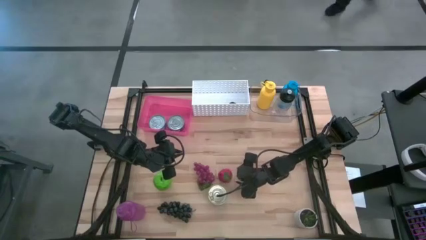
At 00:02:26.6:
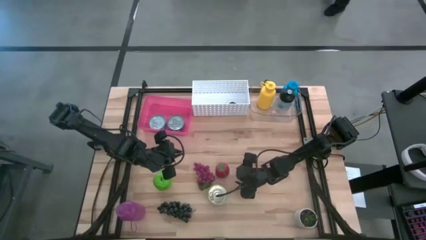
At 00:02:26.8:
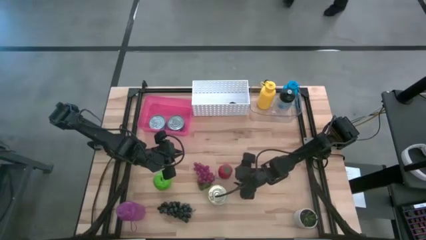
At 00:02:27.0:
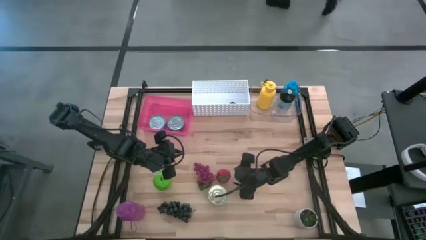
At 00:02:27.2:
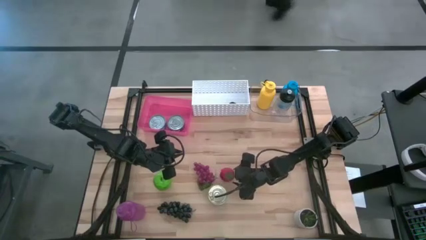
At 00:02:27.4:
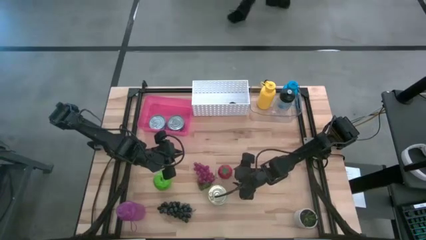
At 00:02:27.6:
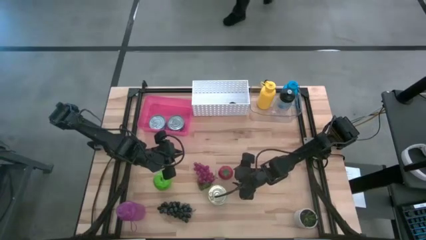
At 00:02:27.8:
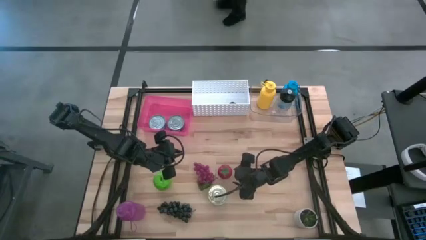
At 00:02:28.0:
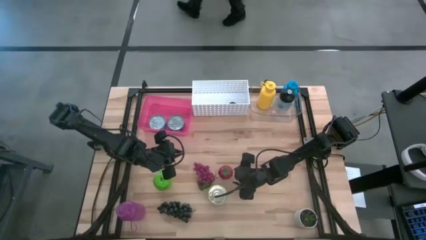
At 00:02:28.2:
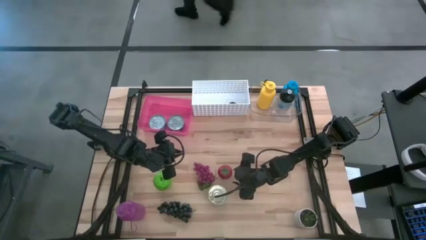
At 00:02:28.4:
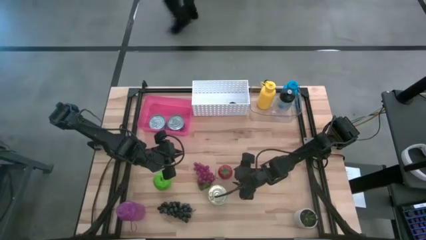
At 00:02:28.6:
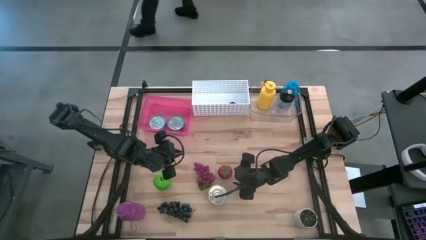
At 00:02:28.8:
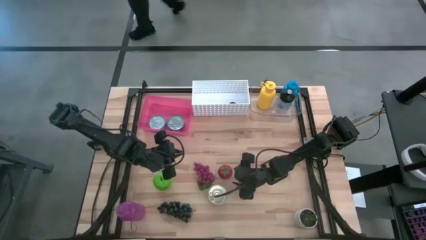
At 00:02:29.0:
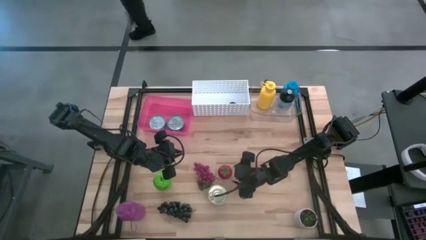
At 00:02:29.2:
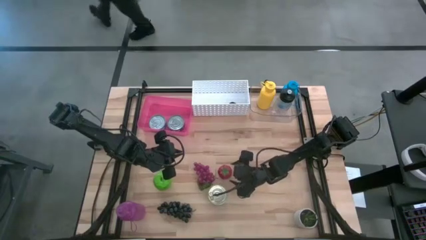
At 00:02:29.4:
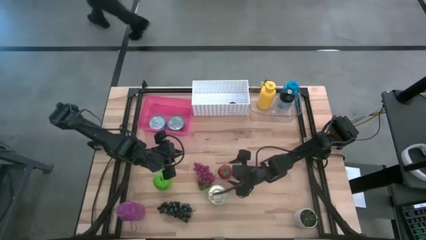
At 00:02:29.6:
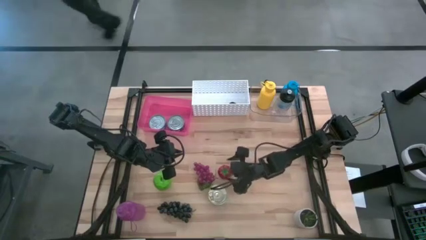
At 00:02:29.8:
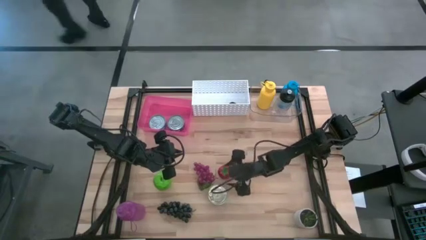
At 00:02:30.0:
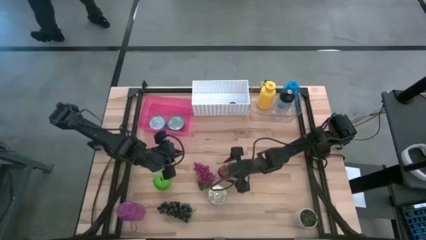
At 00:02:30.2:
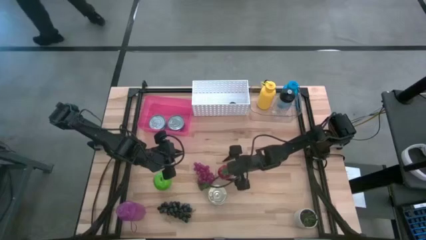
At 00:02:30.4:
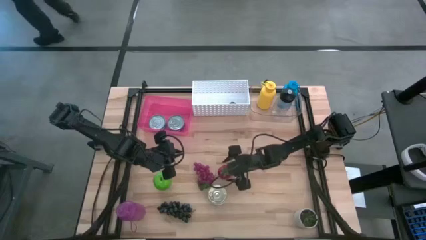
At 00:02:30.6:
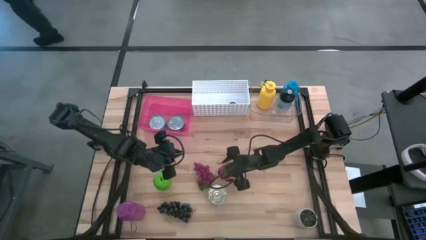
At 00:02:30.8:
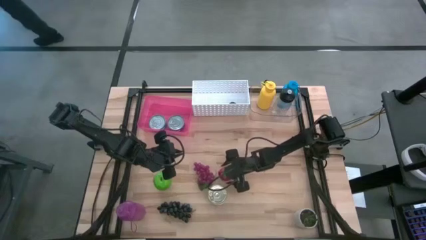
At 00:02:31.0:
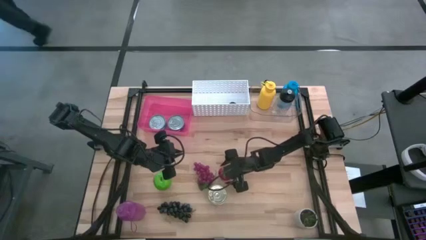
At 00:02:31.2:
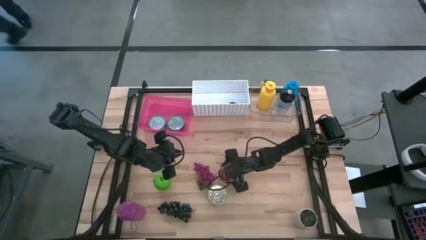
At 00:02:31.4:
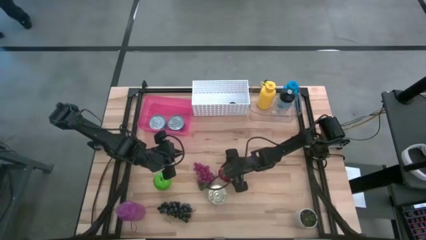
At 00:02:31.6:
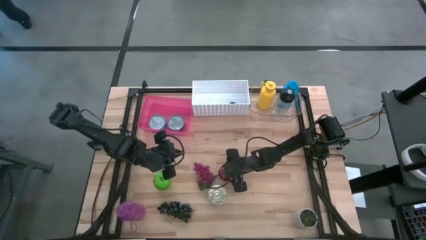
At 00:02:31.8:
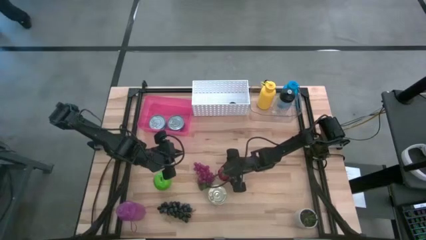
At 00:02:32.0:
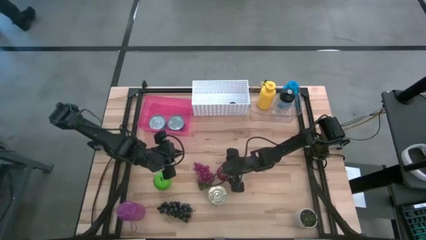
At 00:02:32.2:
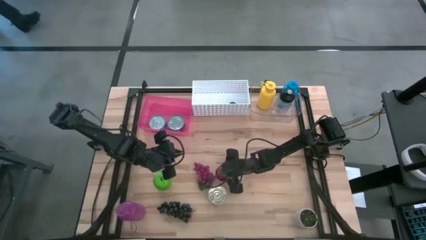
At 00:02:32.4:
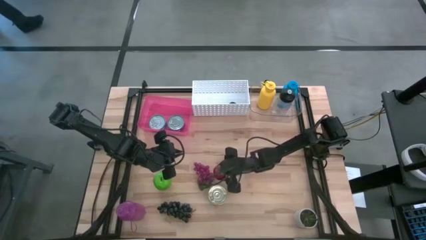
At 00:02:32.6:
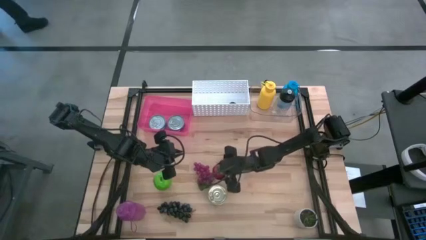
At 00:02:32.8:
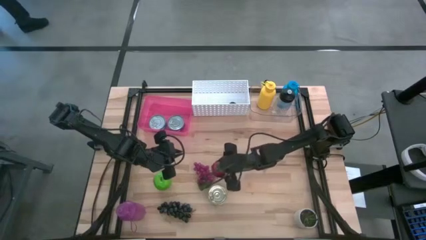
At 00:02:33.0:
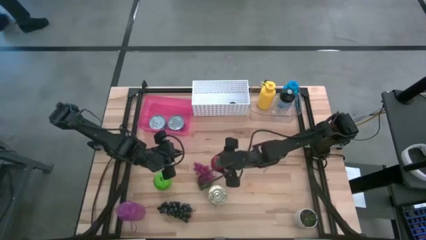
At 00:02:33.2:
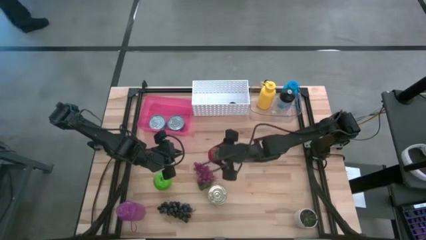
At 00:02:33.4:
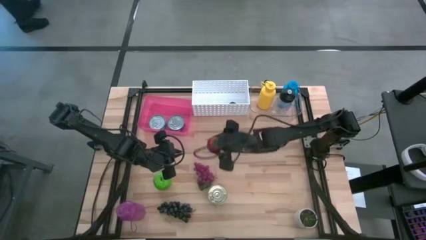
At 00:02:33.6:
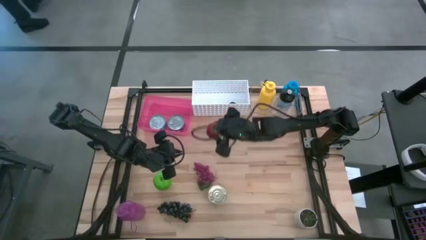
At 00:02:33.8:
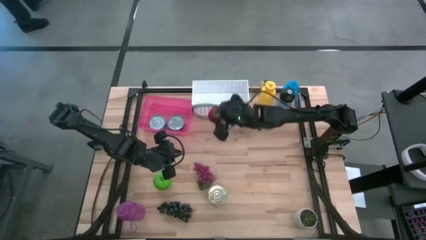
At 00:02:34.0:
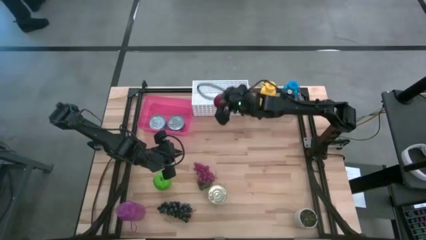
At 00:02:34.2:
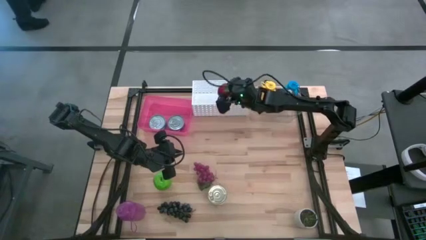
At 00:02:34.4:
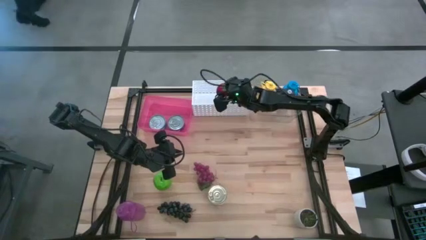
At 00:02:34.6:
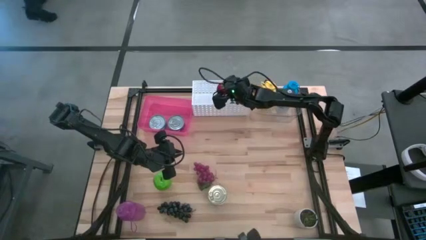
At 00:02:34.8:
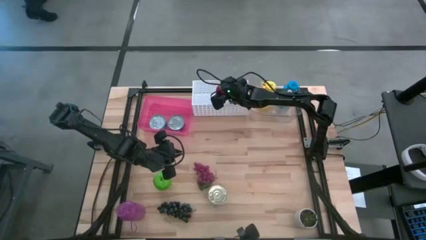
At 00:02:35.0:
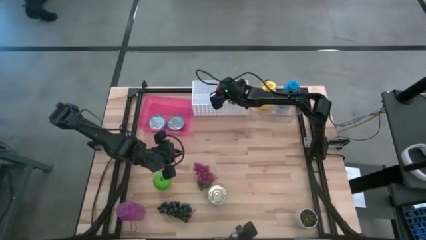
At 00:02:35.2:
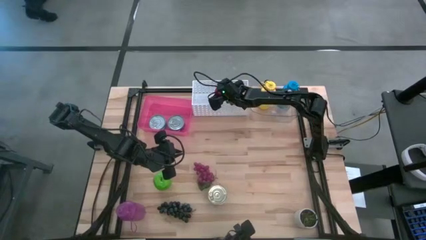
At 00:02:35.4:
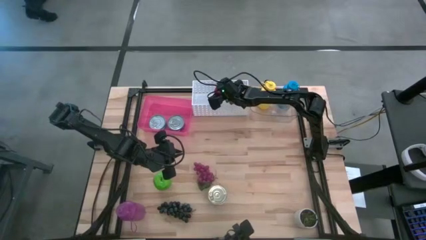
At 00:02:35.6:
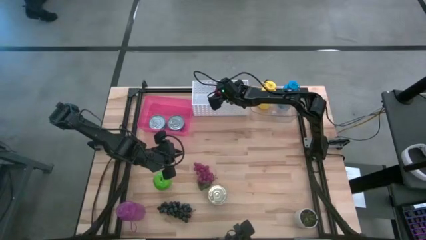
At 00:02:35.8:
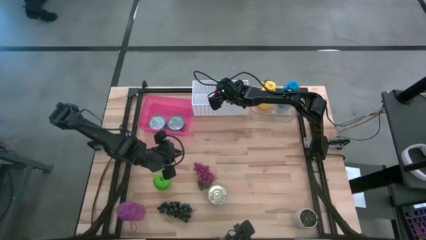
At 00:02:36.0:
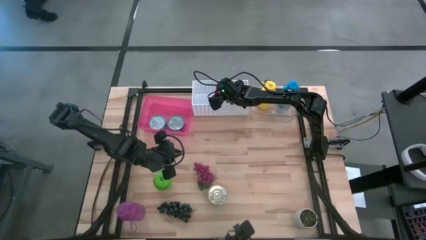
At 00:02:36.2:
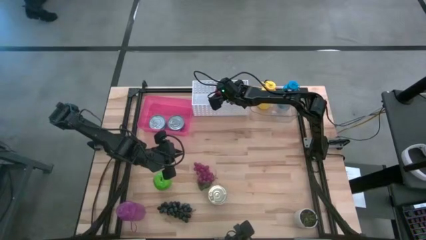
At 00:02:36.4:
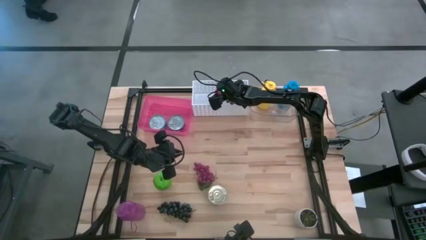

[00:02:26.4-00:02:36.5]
Task: Pick & Place Food Item
Put the red tomato into the white bin

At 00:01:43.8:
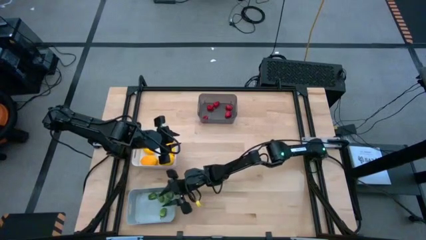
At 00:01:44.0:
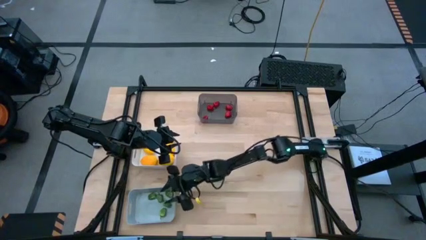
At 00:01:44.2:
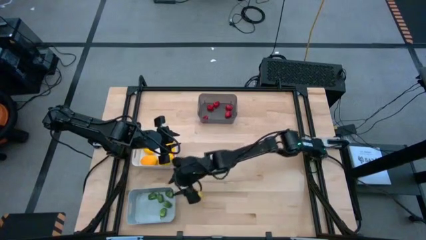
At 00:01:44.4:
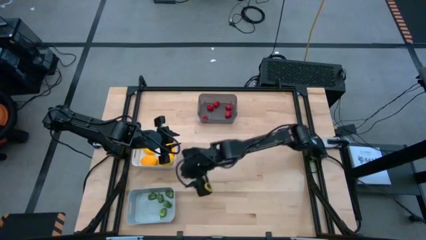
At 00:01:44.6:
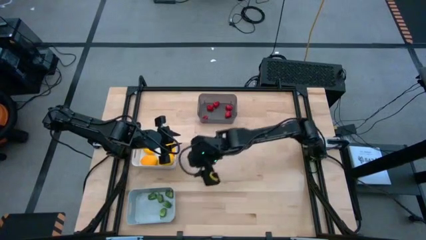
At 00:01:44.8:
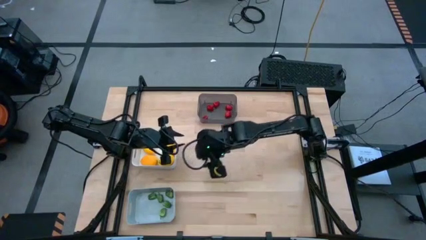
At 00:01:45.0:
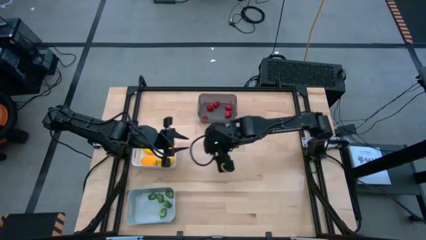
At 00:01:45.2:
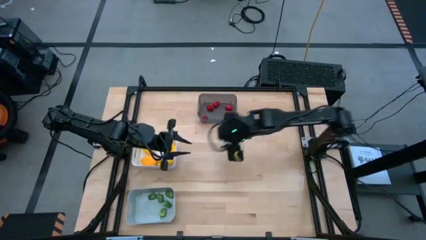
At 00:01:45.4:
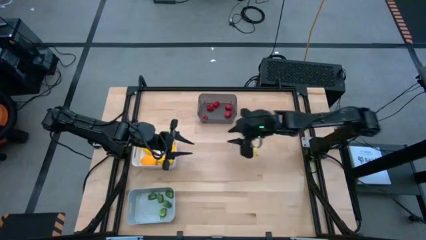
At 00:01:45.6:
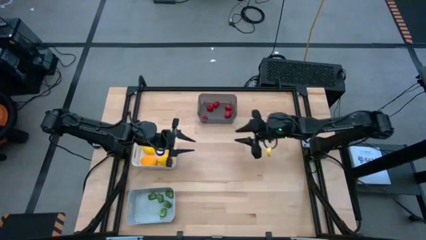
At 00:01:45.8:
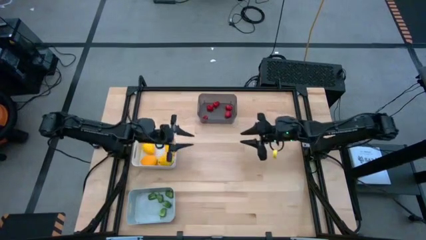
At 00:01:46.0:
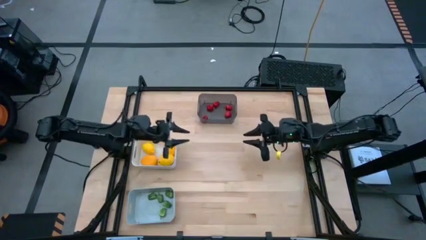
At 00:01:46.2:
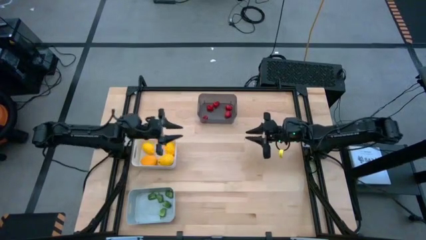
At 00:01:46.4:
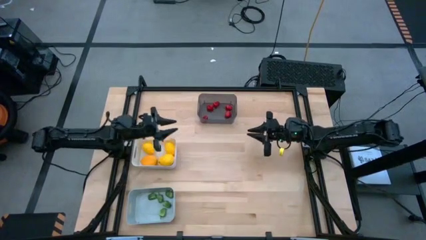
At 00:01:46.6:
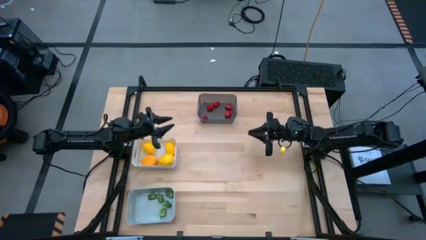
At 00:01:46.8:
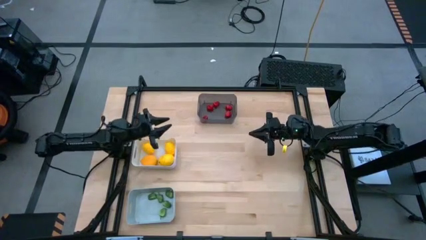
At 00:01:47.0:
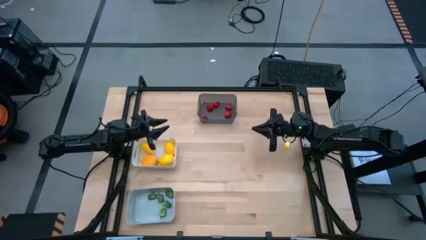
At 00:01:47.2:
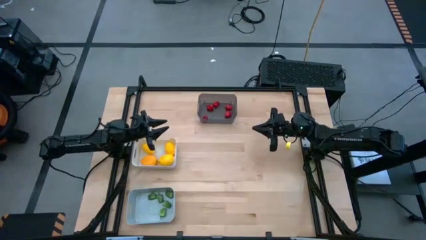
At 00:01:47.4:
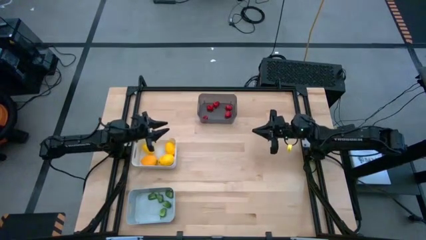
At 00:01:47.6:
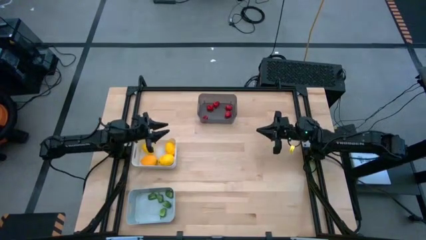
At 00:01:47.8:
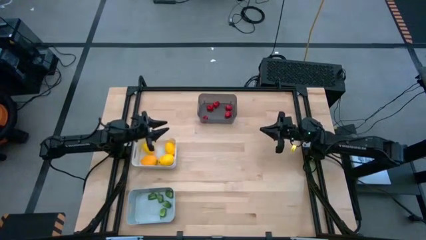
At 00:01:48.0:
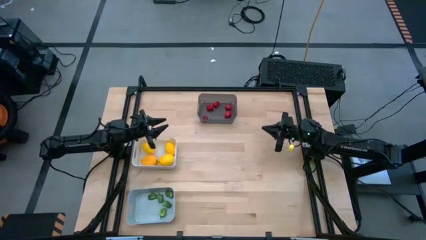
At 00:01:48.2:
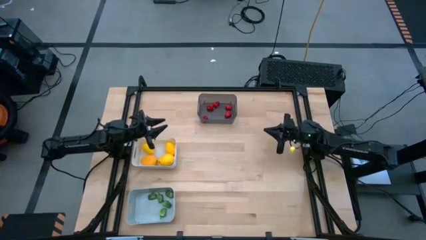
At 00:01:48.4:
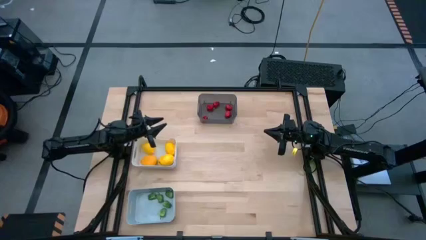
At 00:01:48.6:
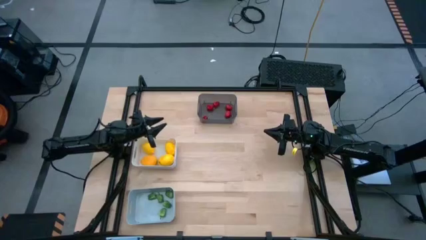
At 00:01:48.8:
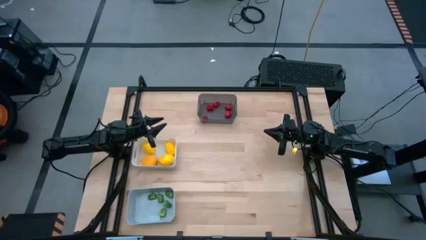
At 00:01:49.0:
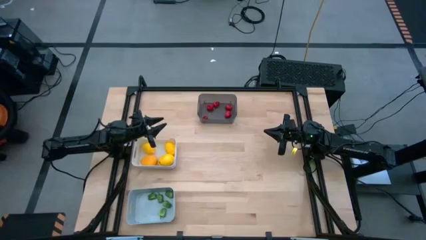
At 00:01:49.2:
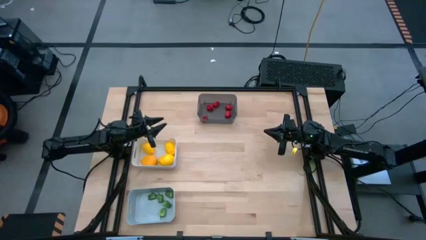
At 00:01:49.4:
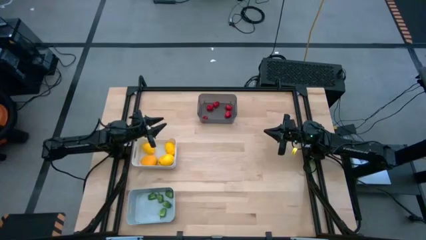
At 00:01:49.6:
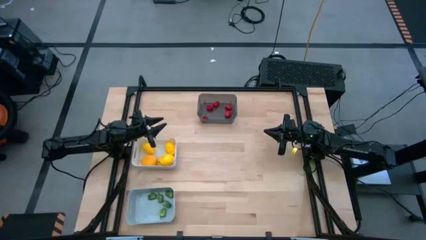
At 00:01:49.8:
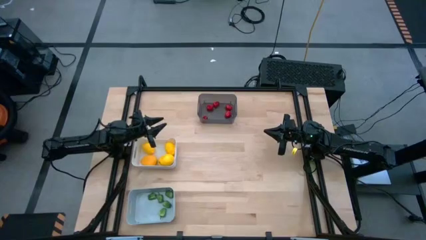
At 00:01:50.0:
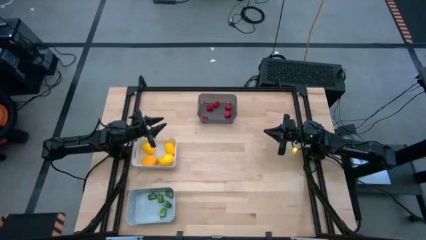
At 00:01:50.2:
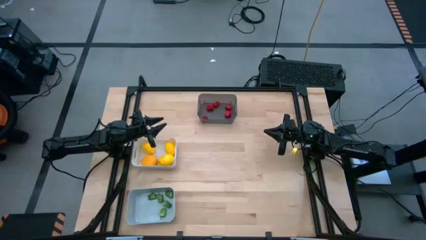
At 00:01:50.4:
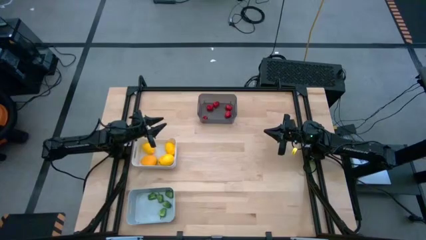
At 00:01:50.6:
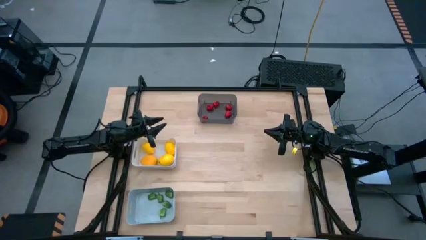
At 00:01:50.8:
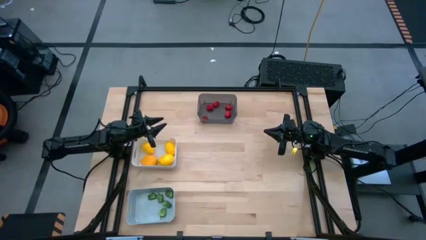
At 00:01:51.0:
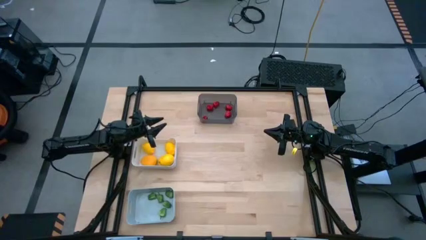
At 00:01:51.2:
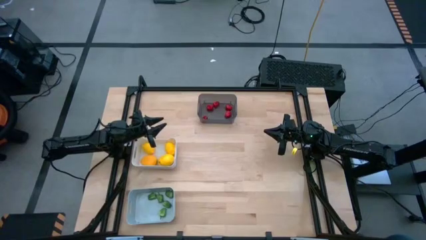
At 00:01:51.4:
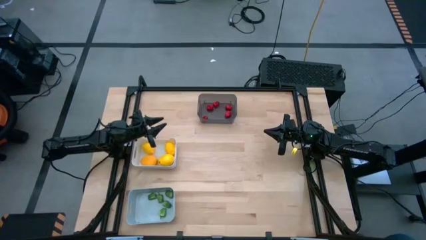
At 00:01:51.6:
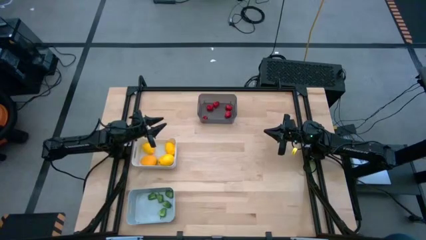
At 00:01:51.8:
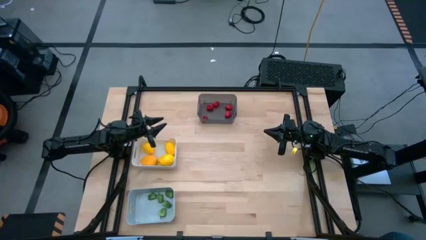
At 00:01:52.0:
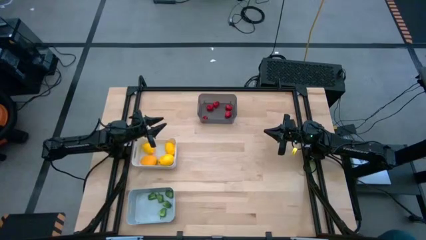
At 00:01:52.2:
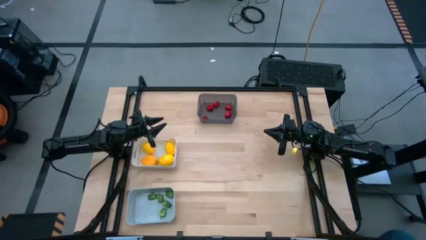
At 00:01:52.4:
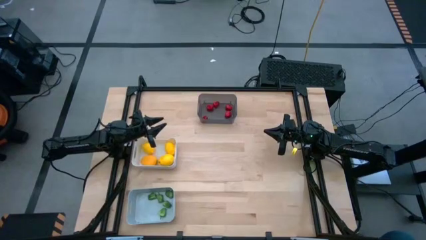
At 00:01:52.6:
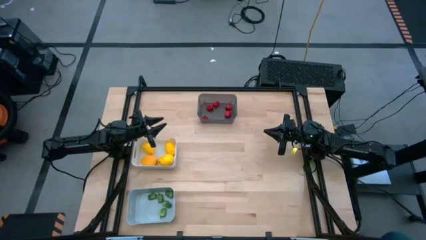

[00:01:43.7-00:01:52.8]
Task: Sort produce into baskets
Return to Home Position
